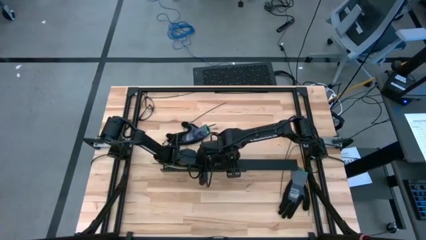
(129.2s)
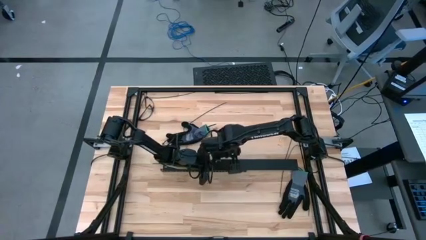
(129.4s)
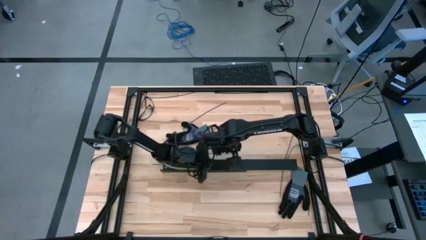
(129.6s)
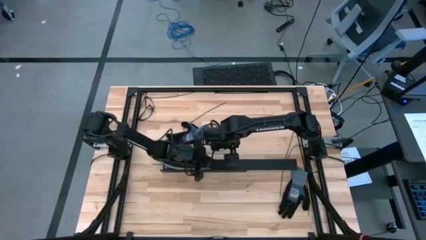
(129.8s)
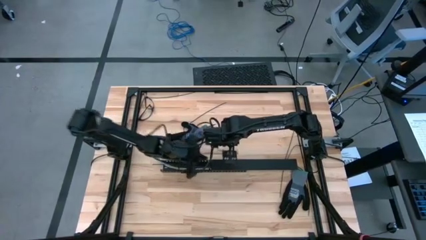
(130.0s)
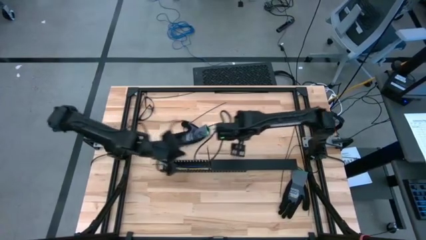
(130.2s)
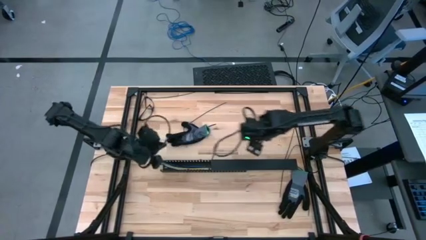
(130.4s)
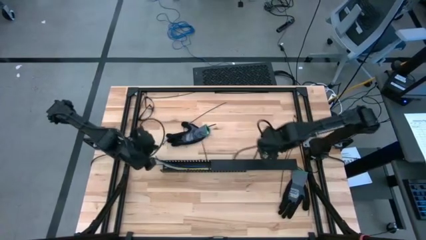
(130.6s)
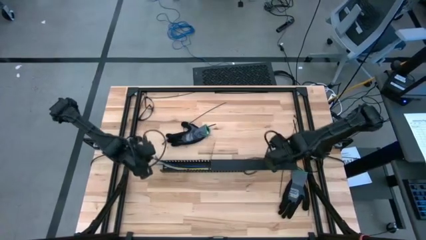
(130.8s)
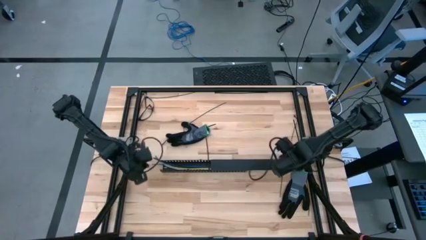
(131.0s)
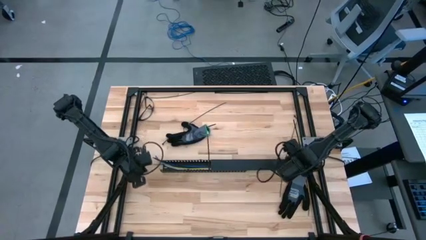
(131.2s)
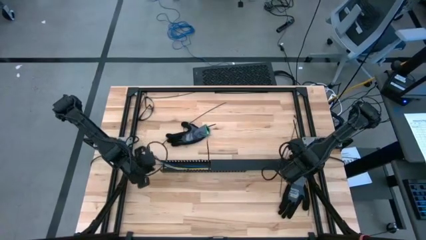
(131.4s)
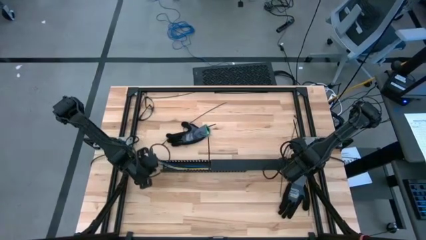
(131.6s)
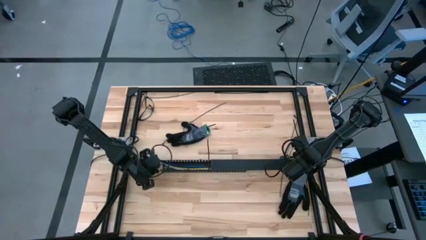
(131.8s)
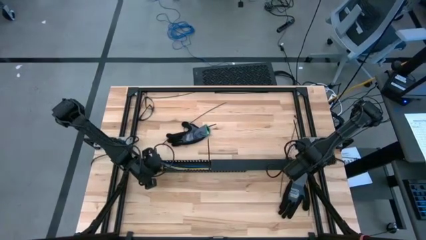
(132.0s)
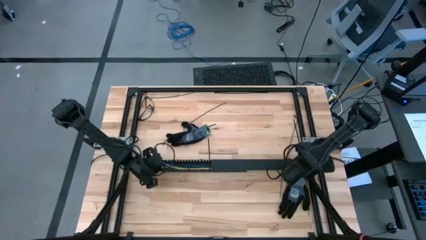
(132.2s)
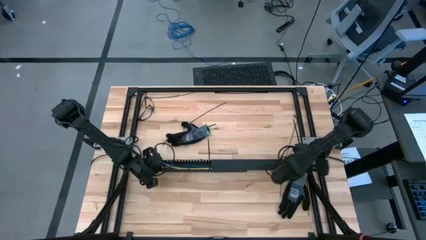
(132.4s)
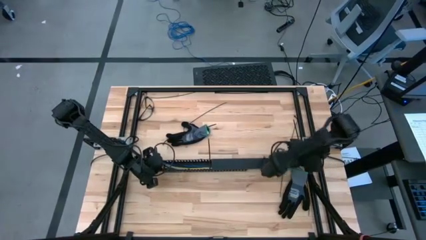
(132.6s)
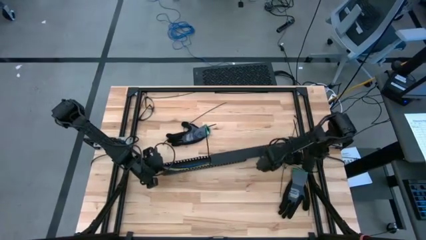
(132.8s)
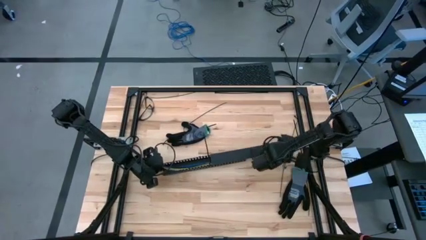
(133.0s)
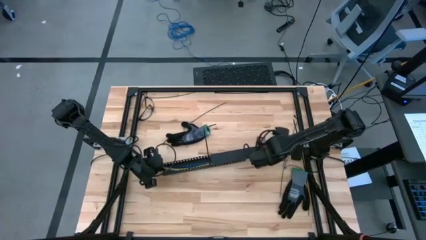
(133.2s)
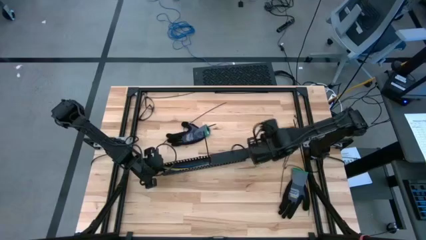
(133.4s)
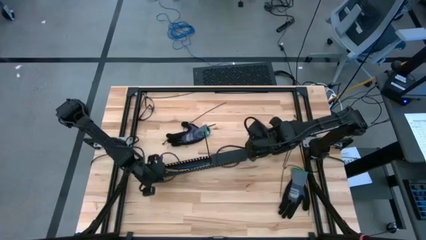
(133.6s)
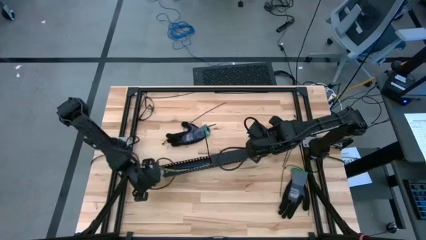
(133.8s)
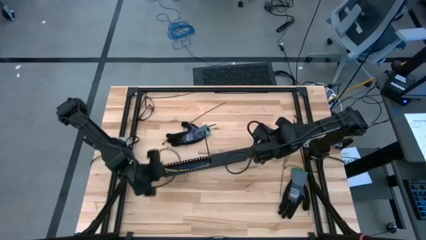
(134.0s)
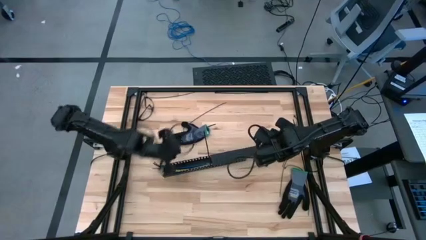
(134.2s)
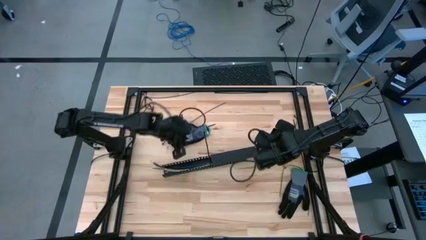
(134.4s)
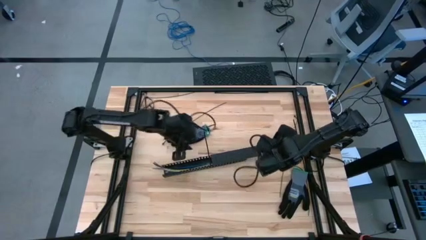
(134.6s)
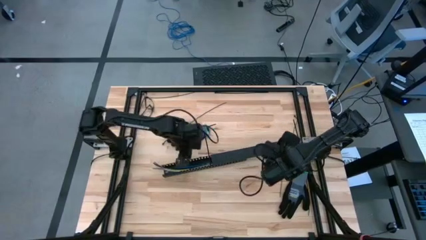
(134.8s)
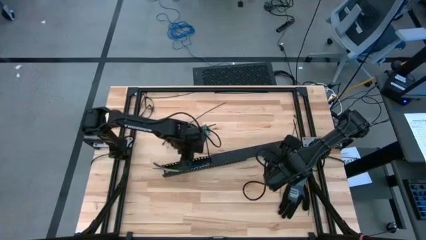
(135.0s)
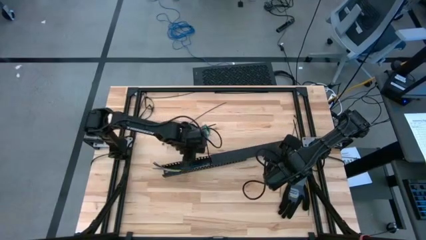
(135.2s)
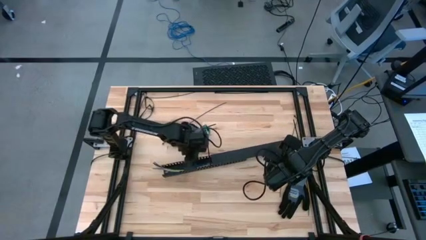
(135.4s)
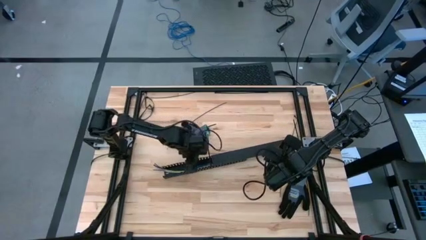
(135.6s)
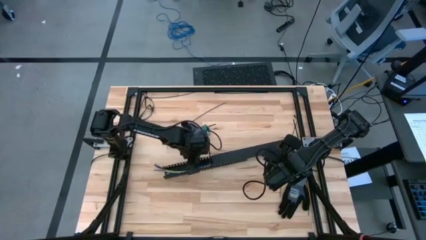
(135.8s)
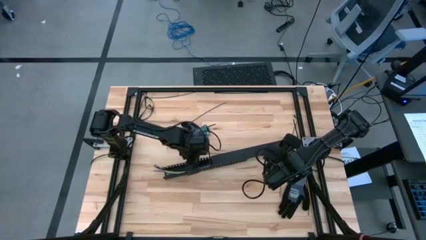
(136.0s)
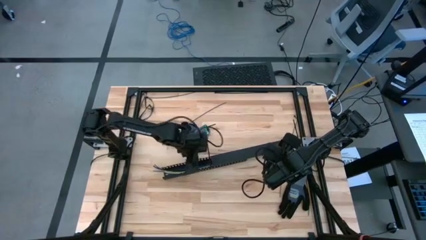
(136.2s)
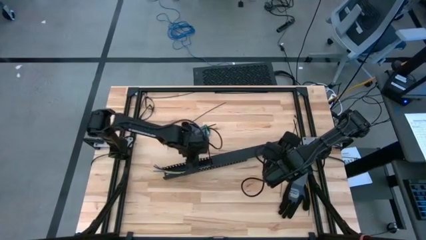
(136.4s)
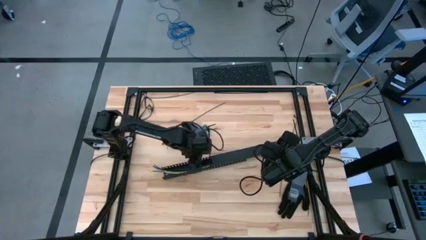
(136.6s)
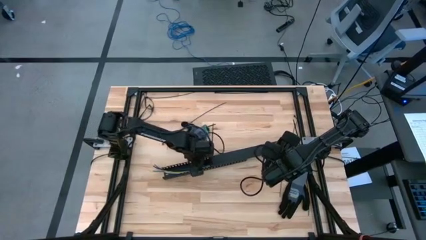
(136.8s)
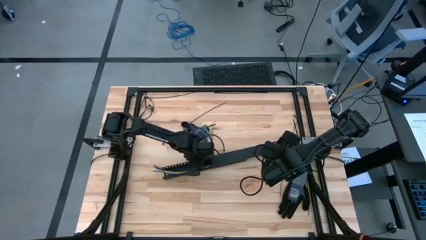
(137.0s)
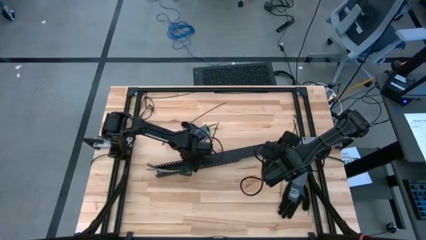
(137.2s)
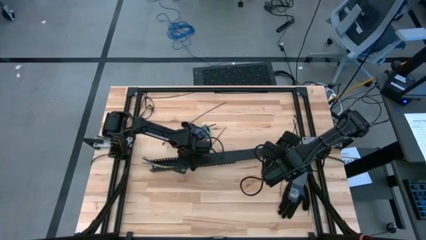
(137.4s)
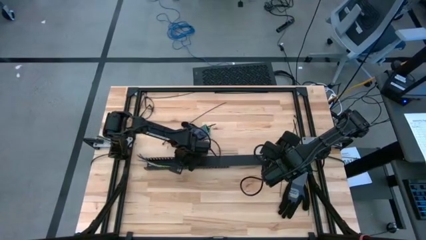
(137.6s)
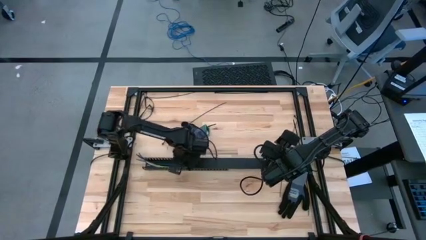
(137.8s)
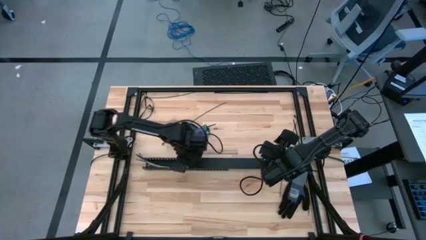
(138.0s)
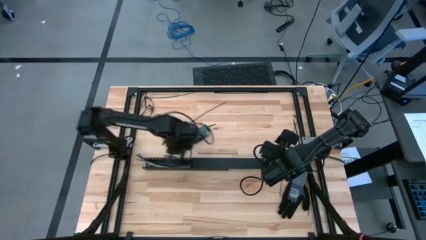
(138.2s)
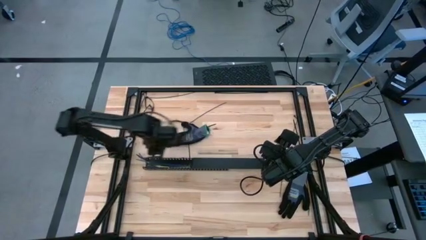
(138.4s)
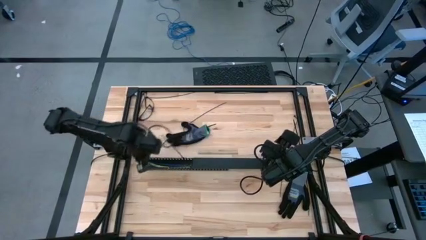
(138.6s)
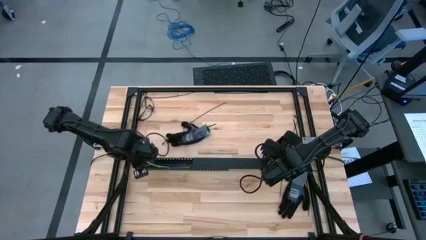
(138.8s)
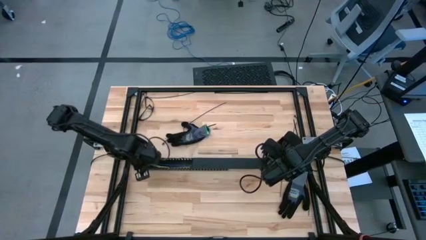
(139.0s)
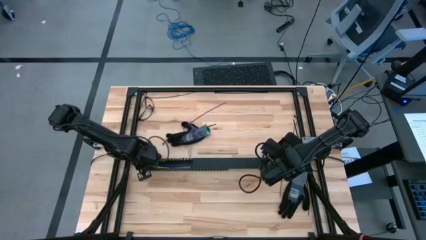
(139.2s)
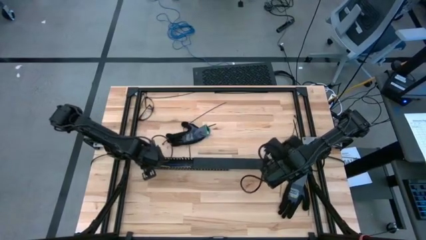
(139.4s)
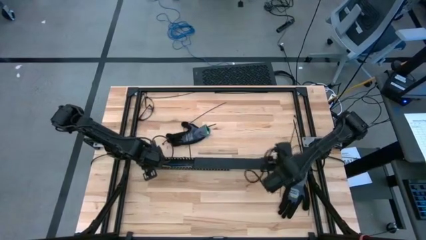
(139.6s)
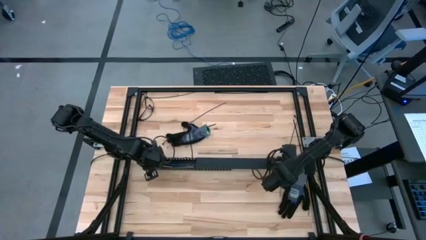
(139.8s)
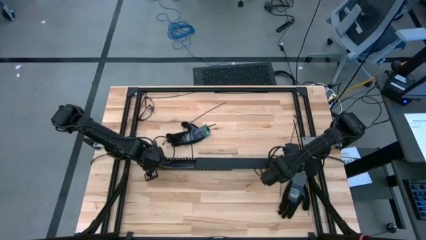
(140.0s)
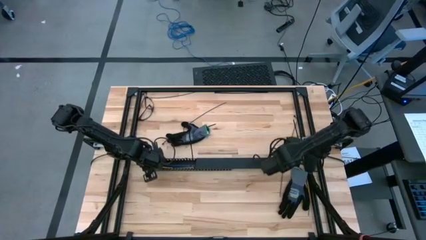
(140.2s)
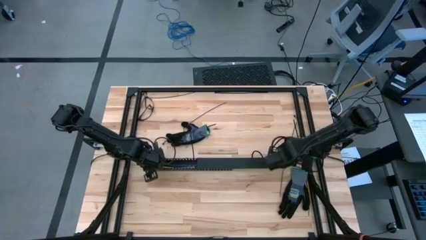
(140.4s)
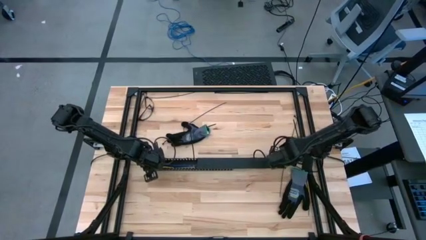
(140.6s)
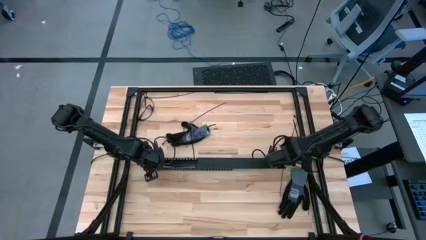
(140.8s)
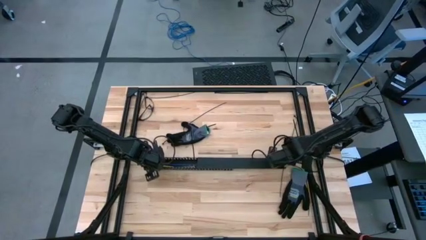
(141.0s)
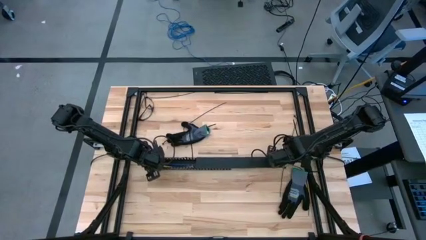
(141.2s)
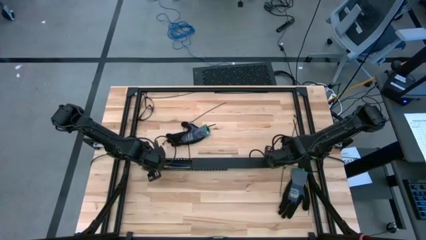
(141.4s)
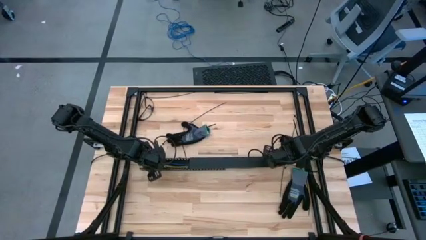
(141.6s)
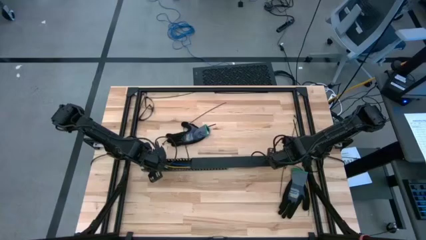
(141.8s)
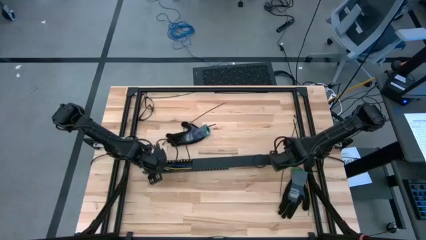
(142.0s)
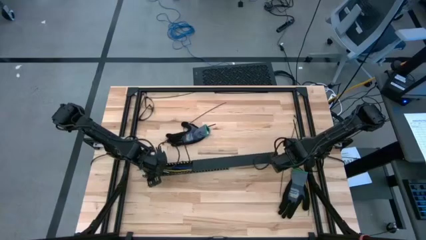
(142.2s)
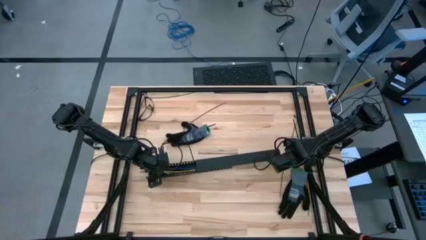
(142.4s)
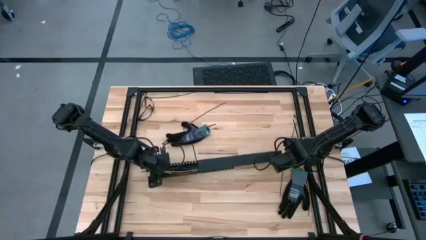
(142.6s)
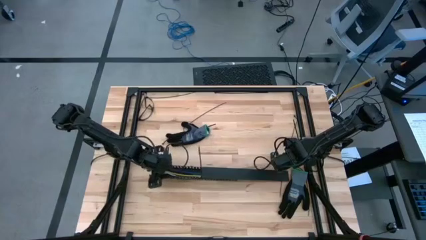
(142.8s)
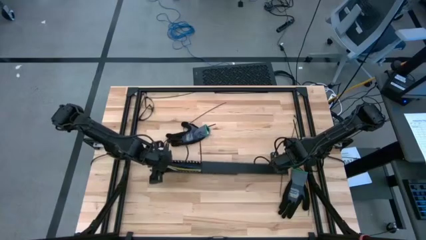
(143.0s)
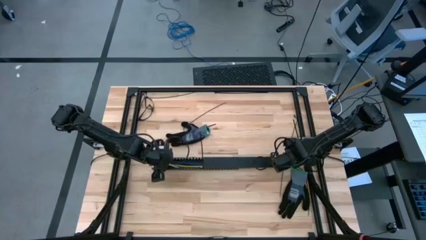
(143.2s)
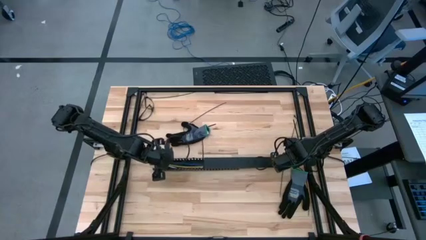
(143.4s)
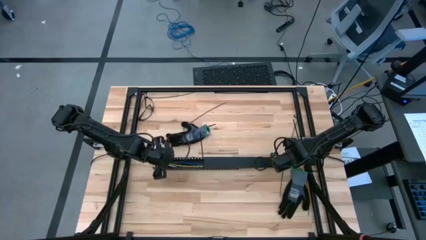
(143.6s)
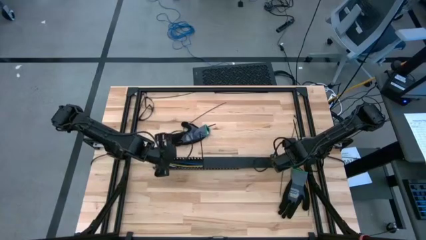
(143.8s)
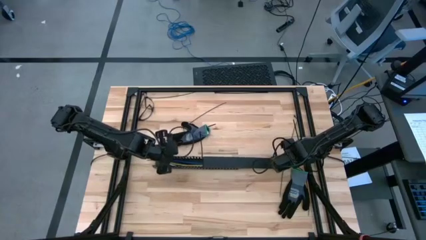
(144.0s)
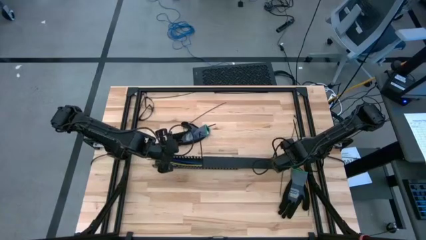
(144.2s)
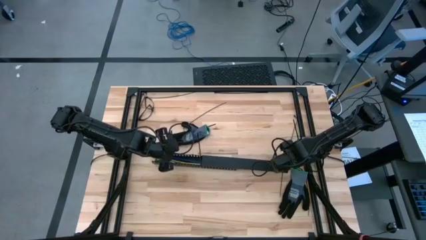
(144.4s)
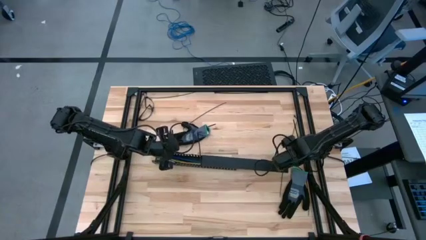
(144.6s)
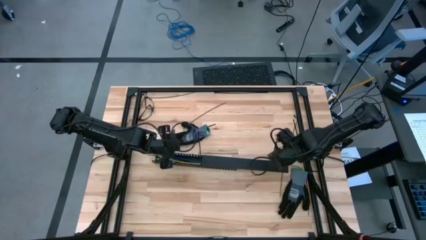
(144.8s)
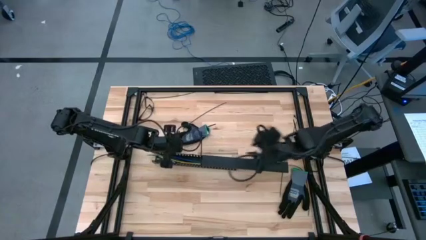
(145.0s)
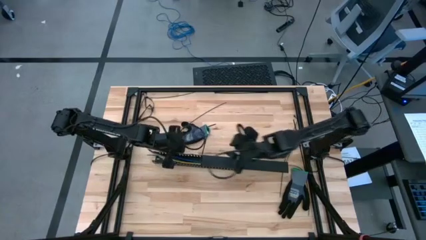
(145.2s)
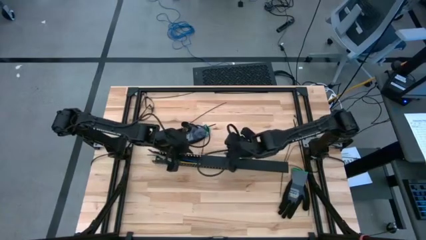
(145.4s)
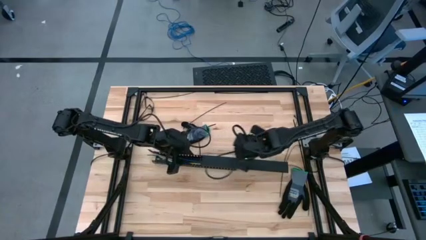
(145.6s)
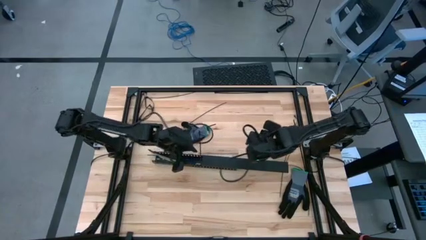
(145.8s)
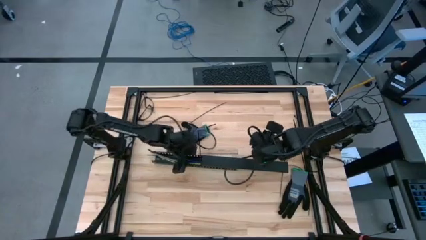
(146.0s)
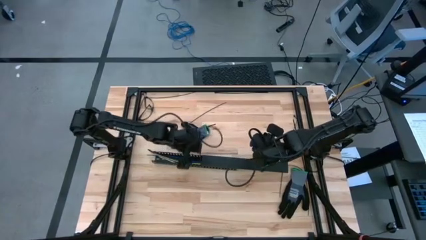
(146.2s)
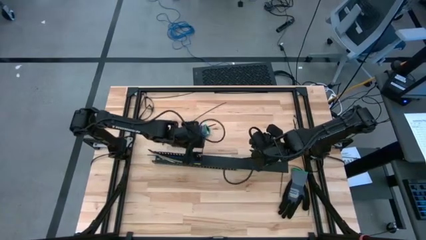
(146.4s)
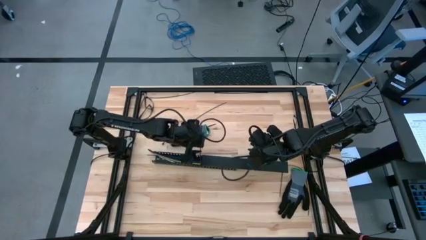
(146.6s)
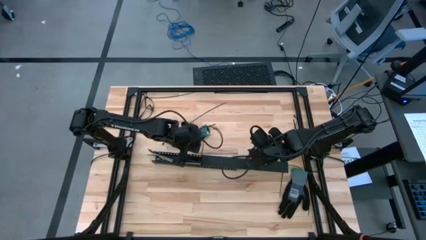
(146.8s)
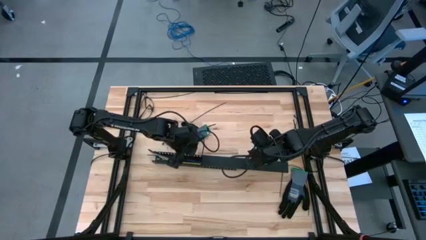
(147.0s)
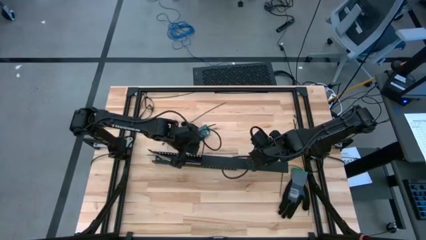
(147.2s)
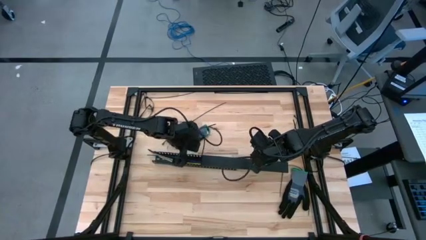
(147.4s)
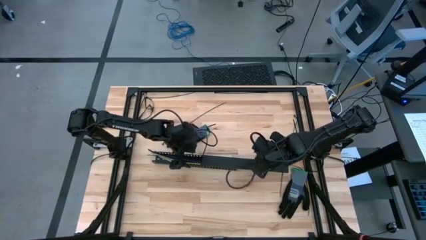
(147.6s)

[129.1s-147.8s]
Task: Ziptie cables
Close the black cable duct lid
